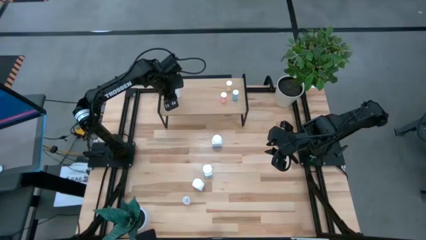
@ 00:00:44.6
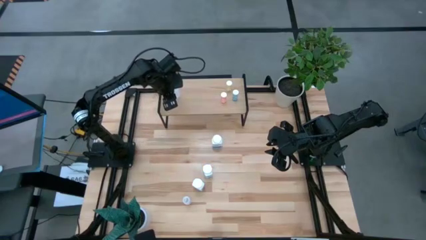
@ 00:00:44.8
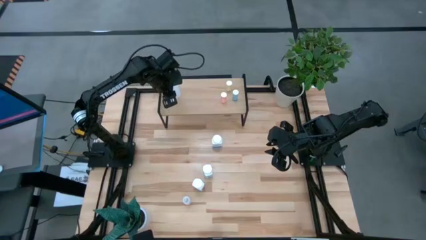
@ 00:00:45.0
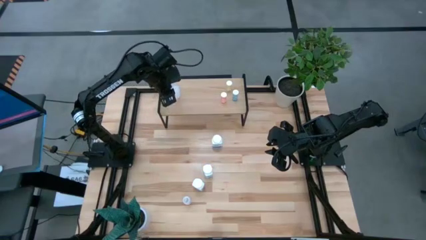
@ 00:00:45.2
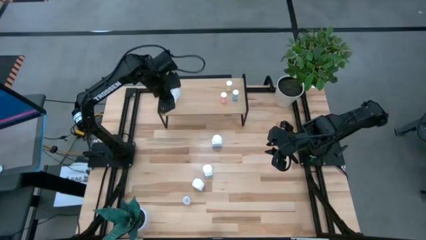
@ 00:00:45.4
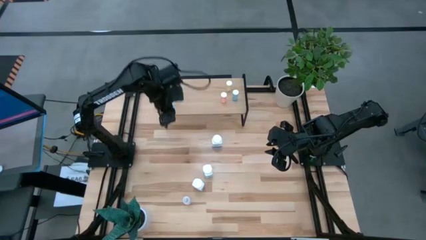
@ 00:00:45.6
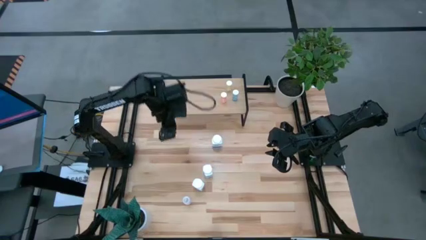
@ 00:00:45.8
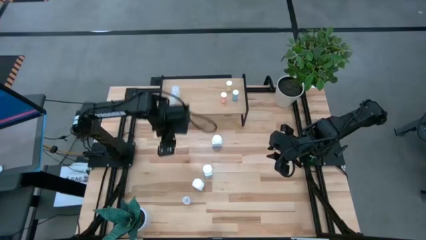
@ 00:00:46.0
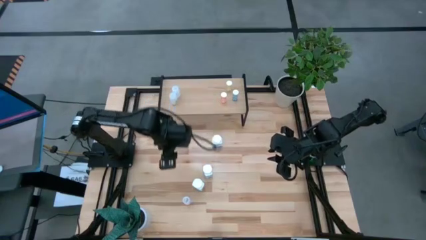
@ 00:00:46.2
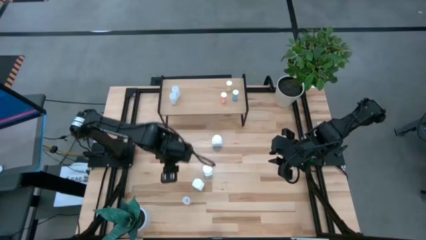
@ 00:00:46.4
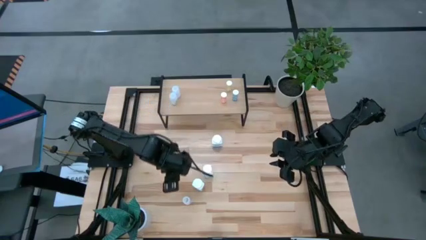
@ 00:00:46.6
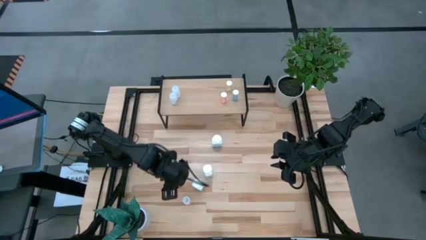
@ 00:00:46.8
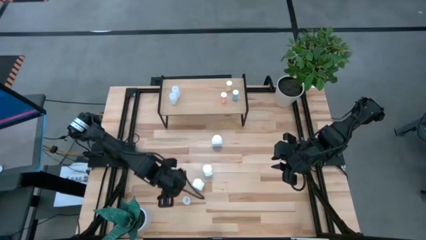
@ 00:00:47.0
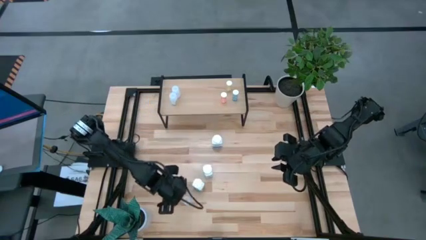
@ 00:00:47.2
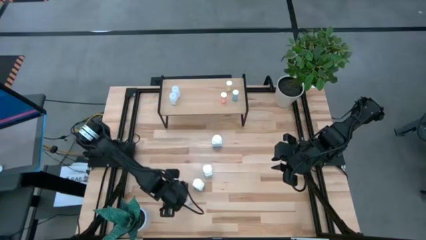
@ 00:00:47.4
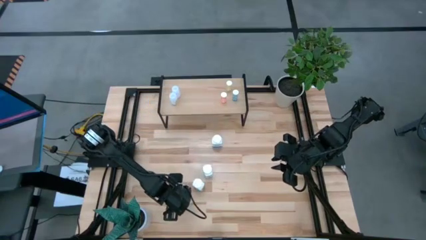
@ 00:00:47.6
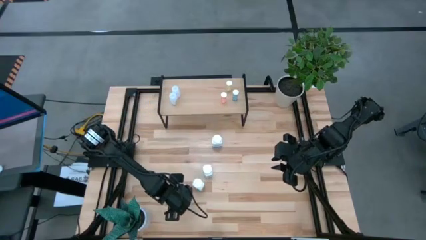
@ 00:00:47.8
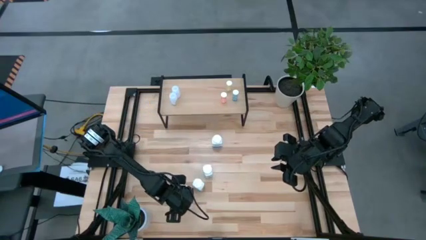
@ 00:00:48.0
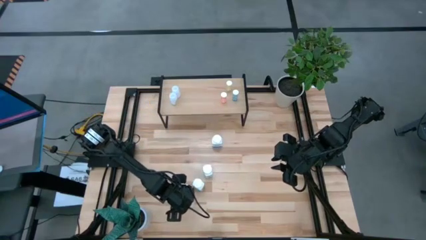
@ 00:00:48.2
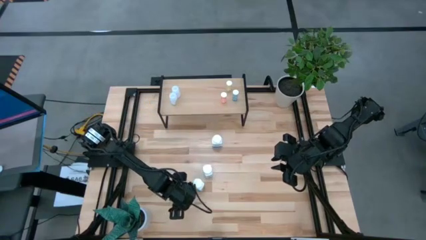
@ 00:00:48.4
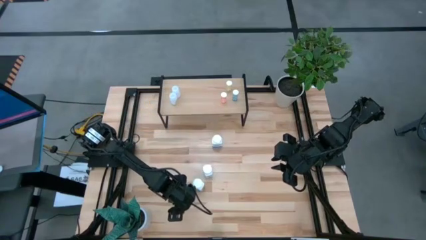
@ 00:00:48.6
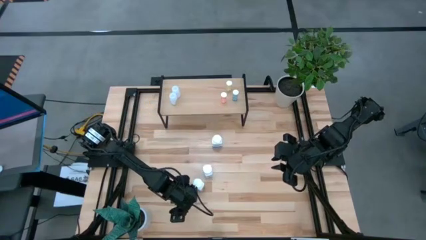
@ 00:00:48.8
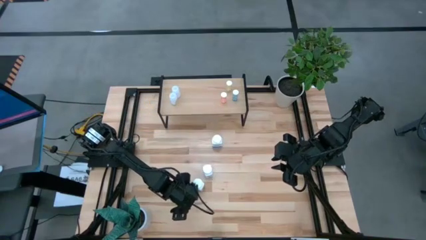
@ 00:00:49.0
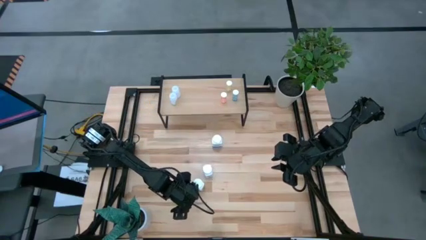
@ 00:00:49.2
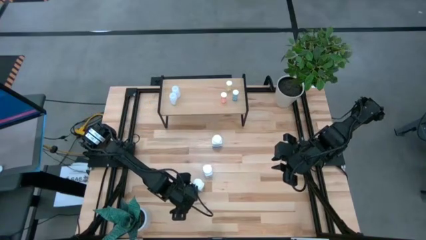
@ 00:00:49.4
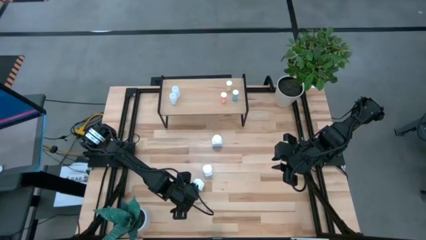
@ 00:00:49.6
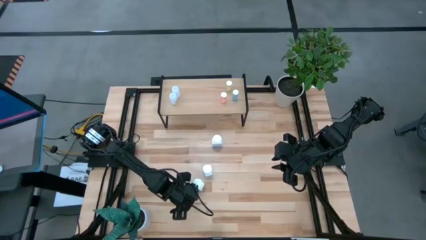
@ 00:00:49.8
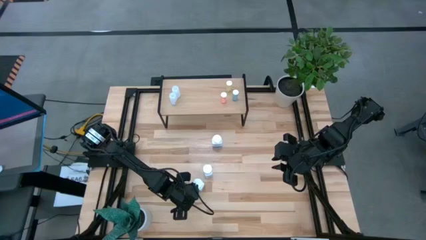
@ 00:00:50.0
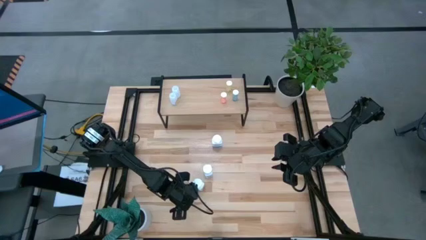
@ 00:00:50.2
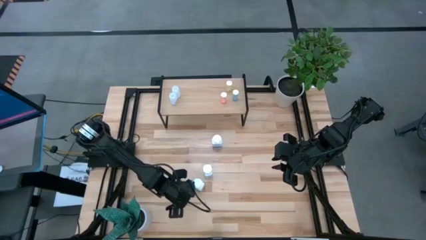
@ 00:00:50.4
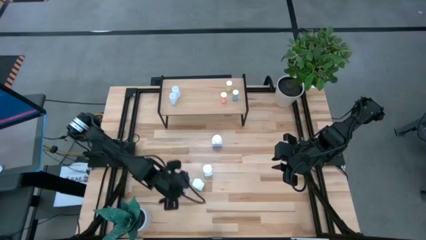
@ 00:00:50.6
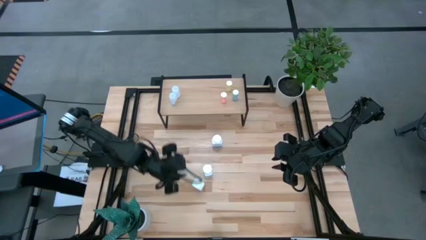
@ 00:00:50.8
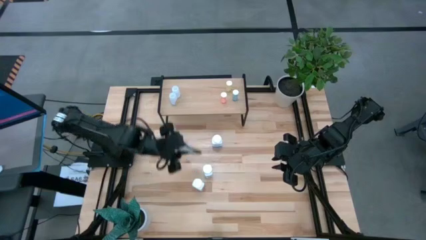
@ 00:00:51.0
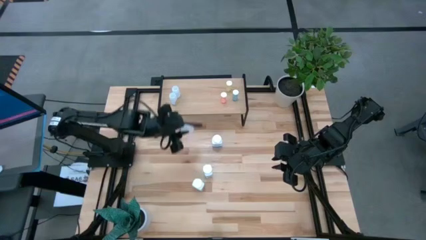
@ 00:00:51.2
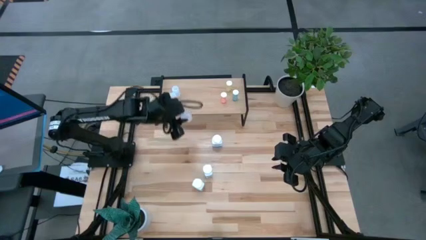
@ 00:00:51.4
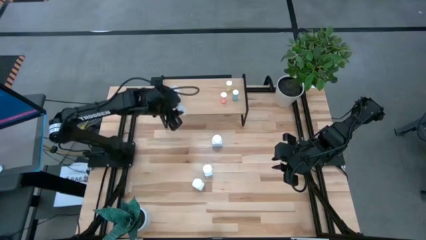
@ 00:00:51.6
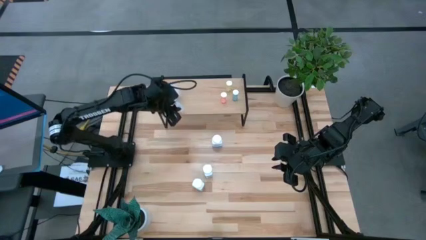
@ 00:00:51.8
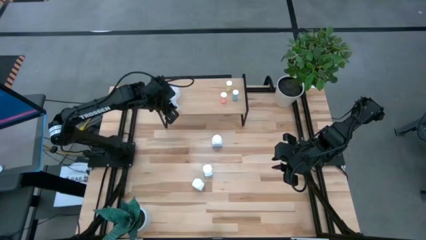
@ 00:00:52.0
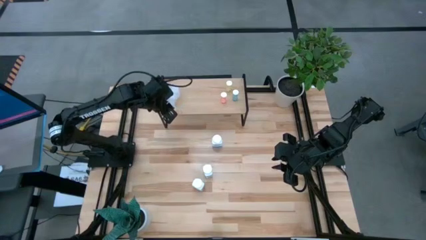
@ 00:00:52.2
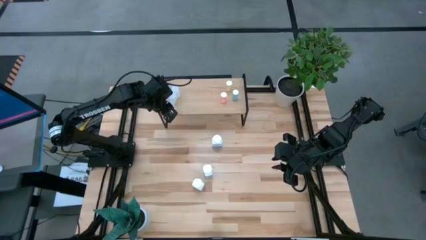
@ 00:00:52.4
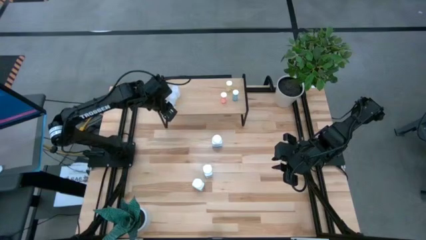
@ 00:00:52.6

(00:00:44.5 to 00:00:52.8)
Task: Pick and place medicine bottles onto shelf by color
Put the transparent pill bottle on the shelf

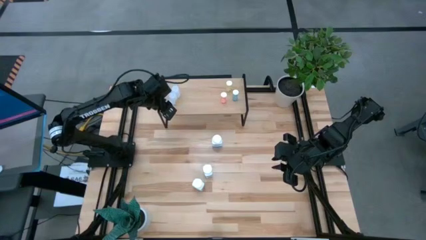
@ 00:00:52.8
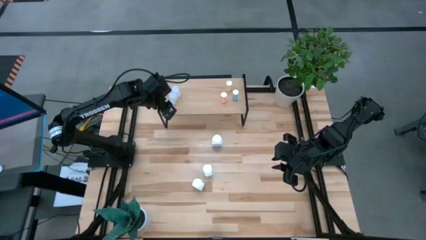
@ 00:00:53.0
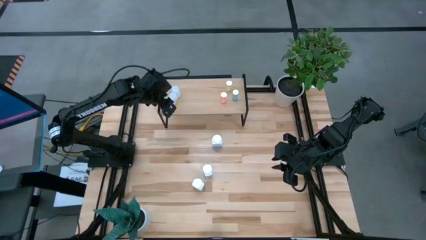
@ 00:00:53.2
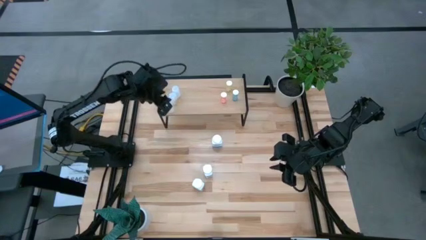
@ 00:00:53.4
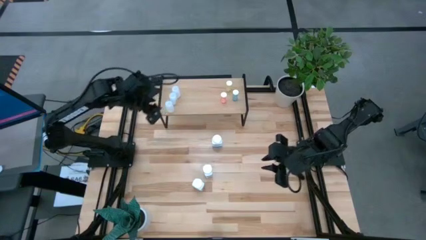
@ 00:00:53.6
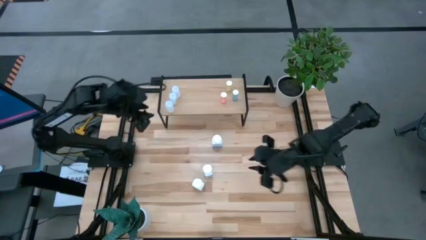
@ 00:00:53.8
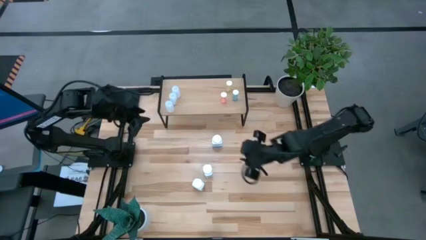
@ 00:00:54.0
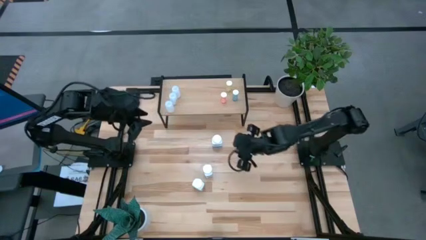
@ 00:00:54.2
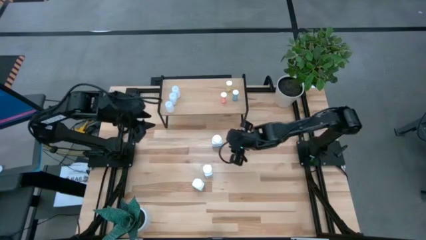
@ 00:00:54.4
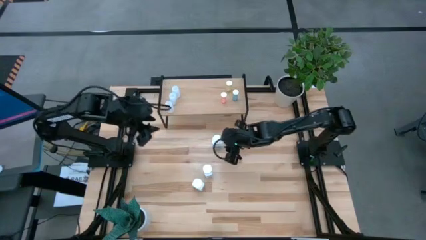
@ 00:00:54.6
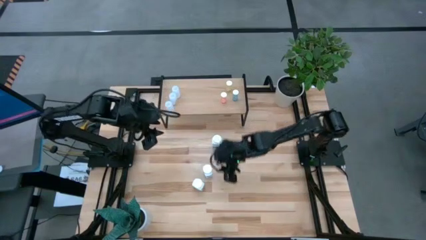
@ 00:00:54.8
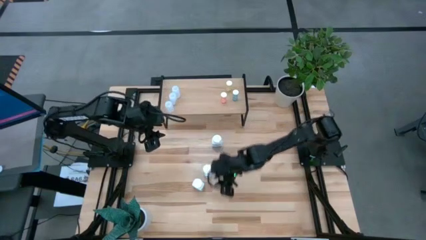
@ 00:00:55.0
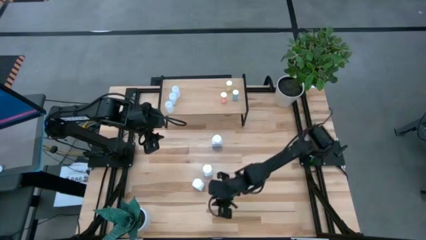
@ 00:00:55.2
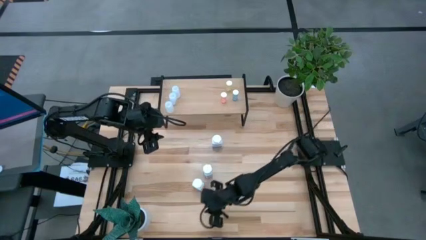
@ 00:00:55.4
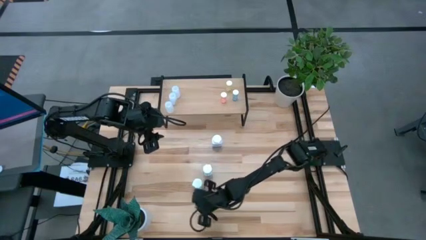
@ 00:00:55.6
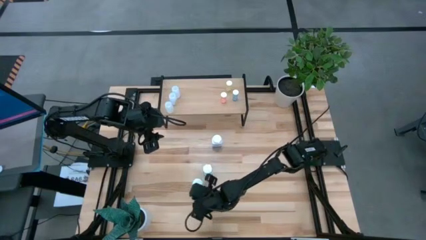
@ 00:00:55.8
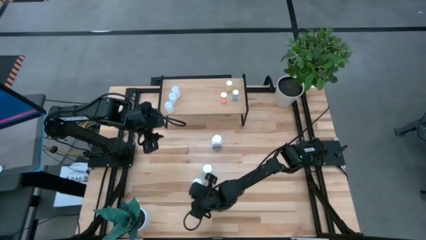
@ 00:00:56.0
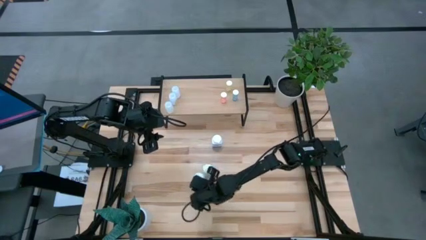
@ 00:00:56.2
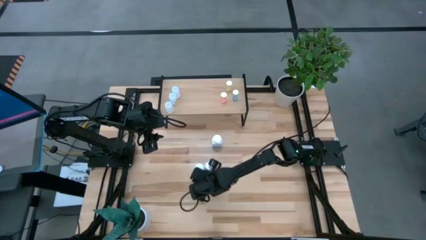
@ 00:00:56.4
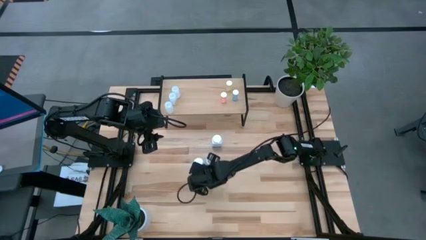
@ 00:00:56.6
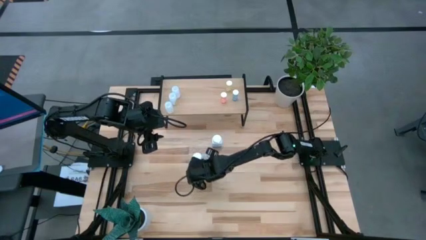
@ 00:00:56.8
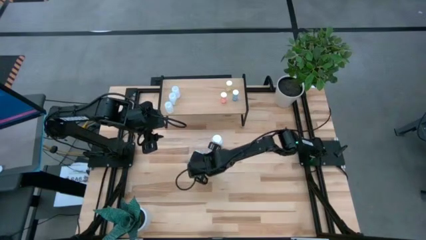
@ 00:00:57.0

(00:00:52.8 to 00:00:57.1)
Adjust the white pill bottles
